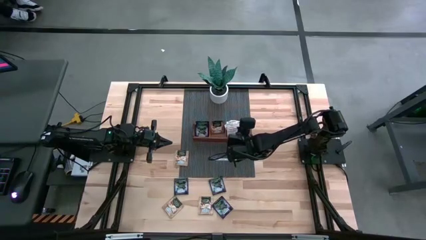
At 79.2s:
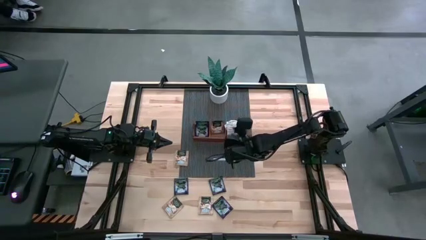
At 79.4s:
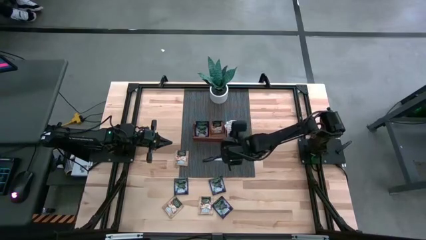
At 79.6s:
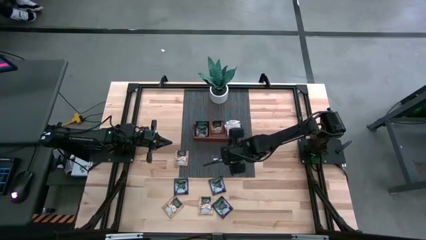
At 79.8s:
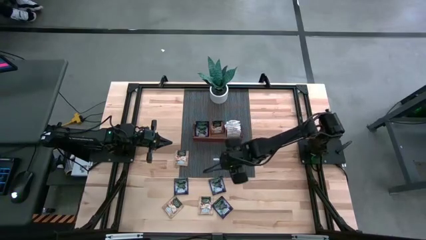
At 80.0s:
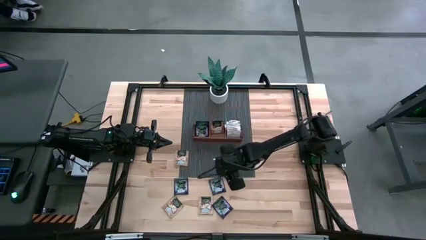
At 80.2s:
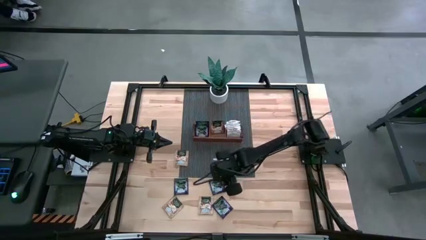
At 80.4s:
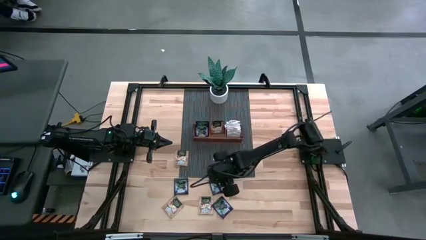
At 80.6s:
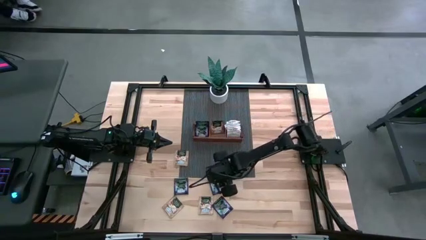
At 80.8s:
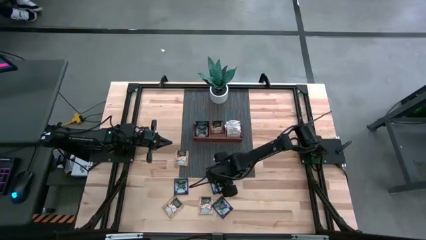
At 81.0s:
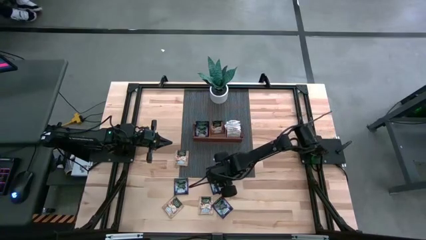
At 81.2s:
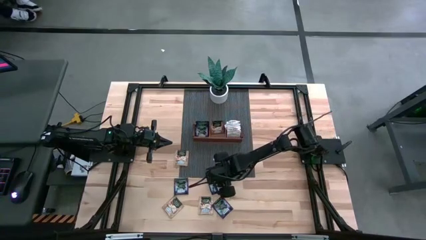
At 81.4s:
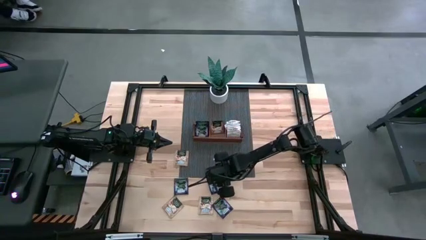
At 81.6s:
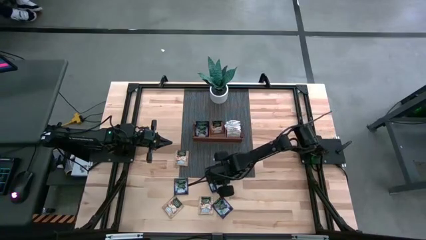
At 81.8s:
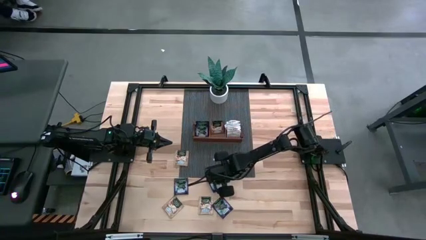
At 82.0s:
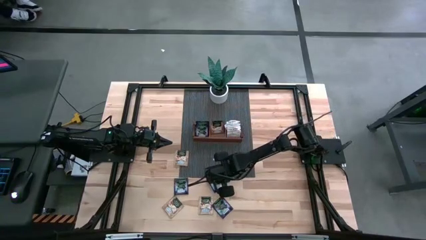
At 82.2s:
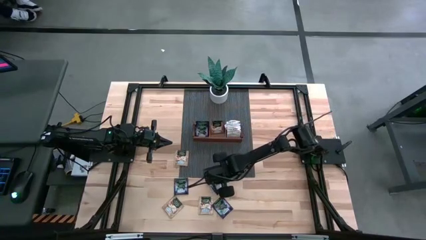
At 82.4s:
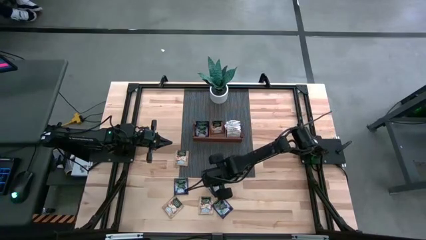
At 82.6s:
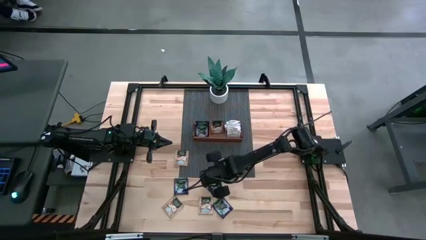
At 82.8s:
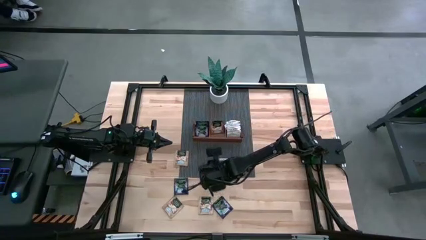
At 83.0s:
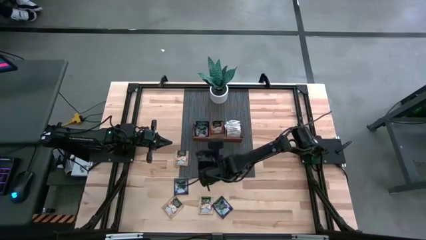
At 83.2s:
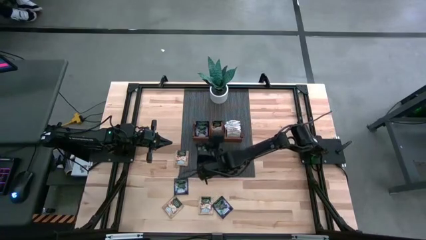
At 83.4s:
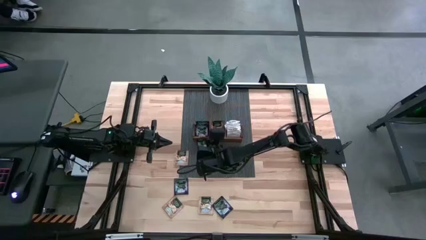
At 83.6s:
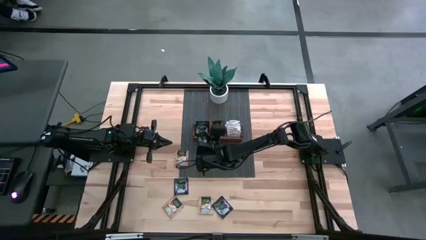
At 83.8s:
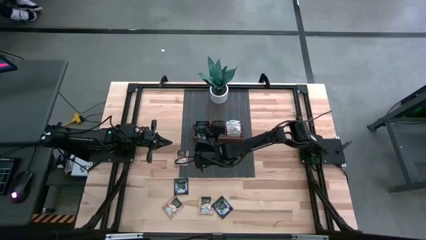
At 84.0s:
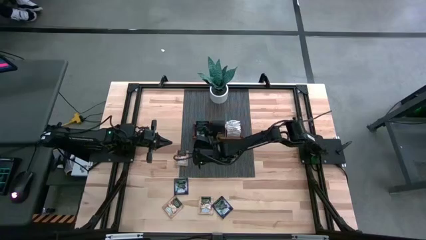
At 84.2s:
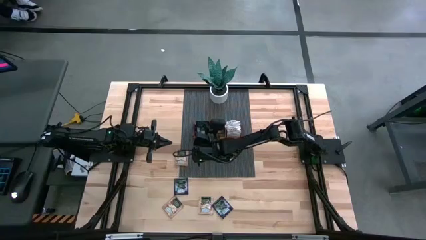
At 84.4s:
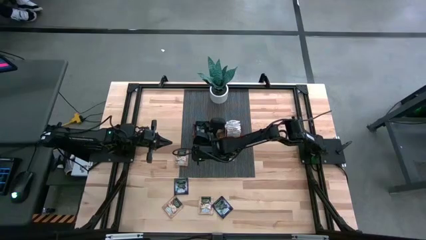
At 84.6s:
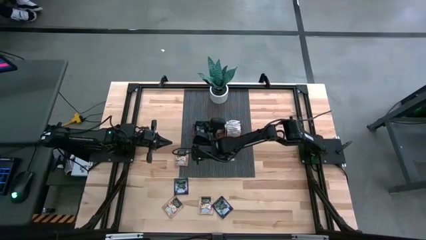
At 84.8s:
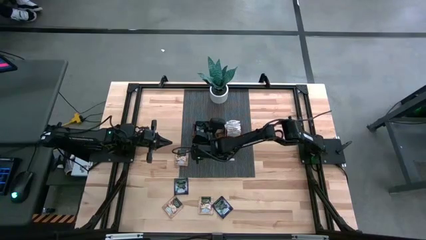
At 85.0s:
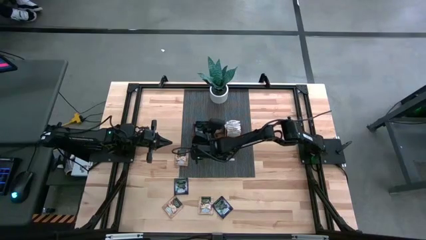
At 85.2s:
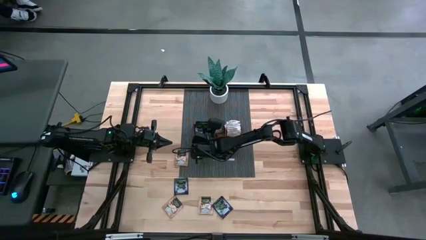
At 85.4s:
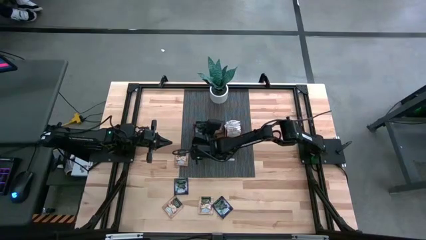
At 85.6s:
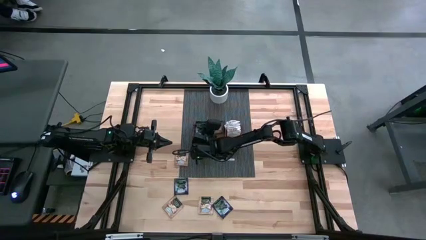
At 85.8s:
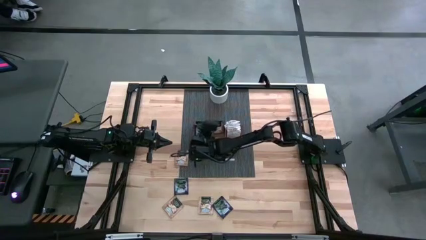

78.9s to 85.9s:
Task: Pick & Place Tea
Put the violet tea bag into the left section of the wooden organizer

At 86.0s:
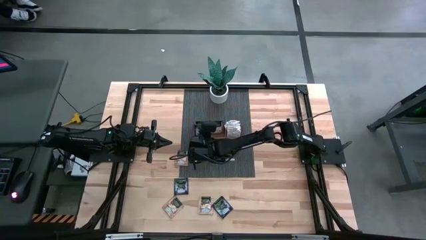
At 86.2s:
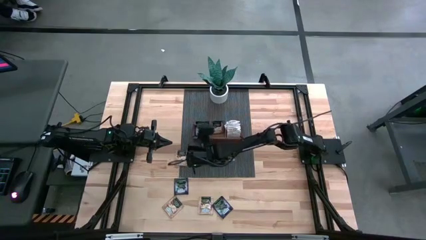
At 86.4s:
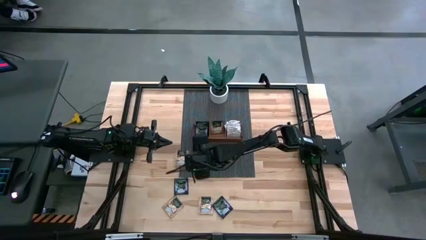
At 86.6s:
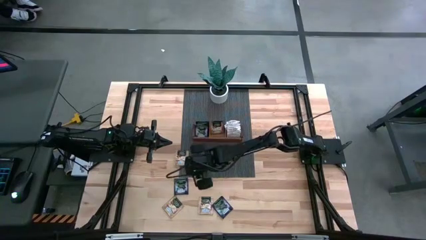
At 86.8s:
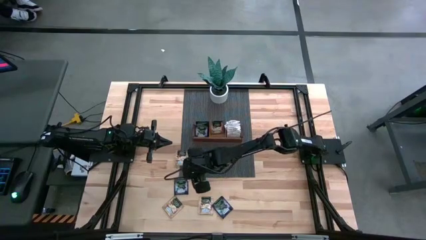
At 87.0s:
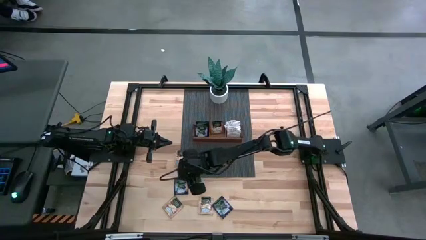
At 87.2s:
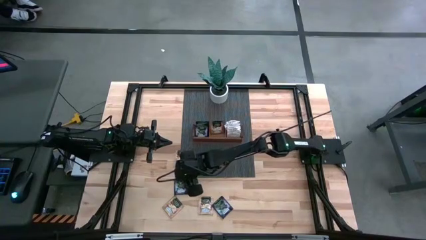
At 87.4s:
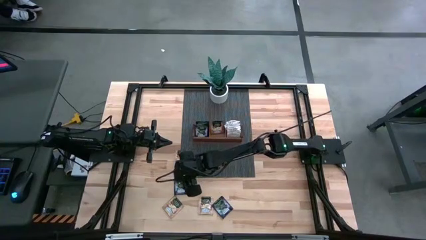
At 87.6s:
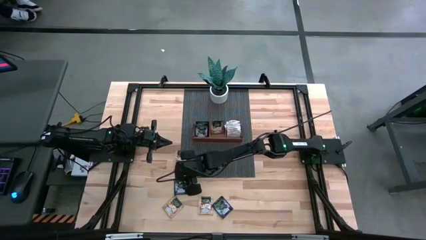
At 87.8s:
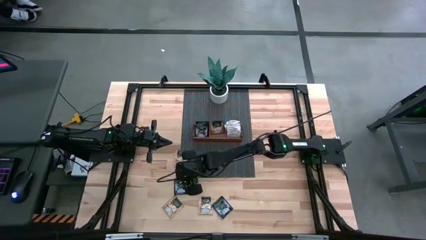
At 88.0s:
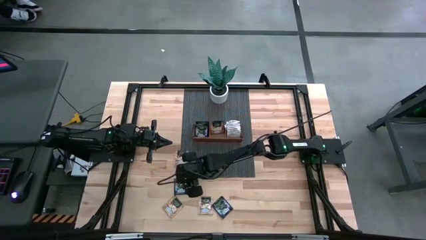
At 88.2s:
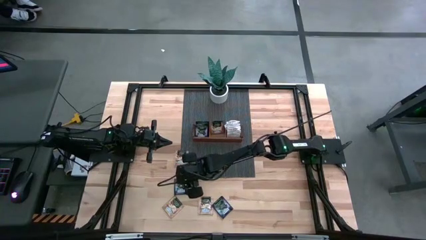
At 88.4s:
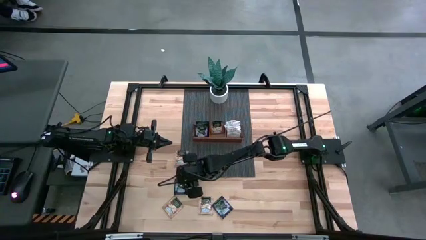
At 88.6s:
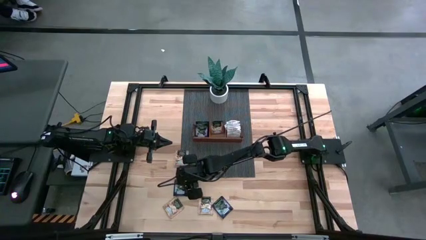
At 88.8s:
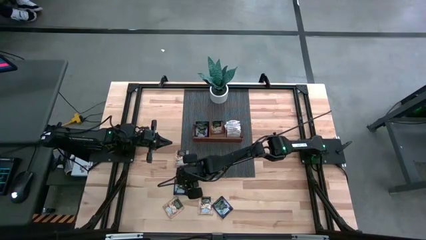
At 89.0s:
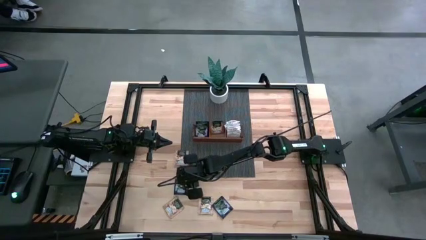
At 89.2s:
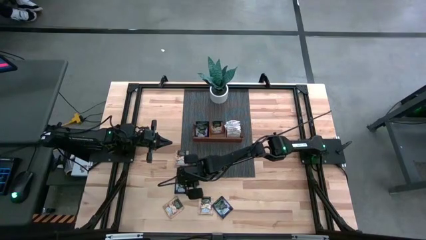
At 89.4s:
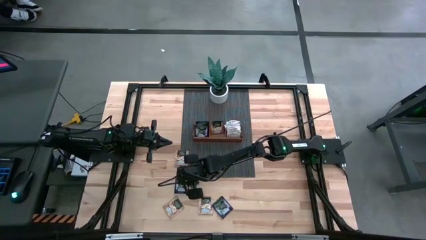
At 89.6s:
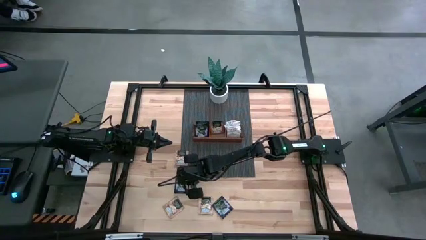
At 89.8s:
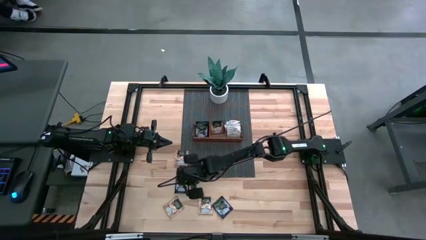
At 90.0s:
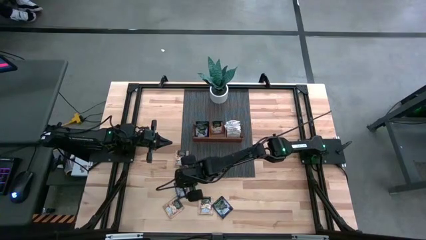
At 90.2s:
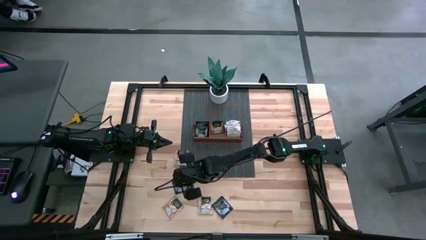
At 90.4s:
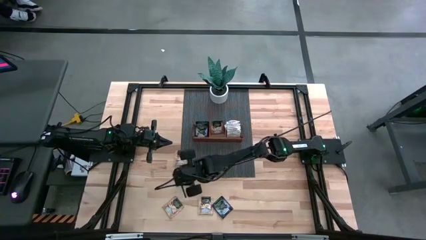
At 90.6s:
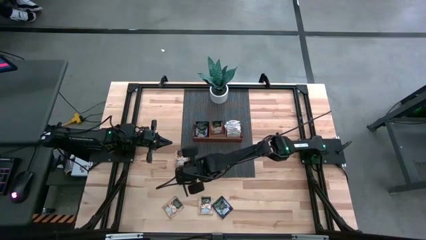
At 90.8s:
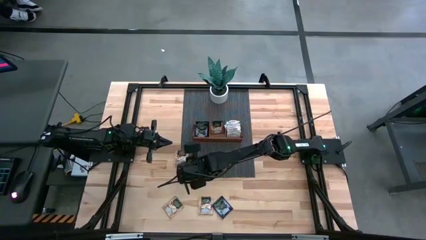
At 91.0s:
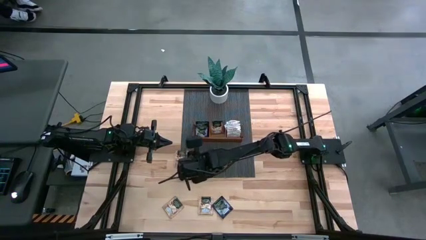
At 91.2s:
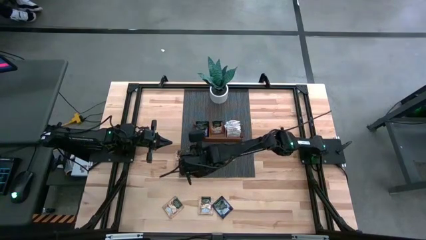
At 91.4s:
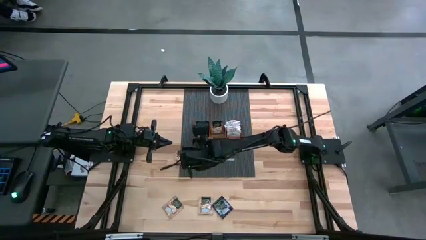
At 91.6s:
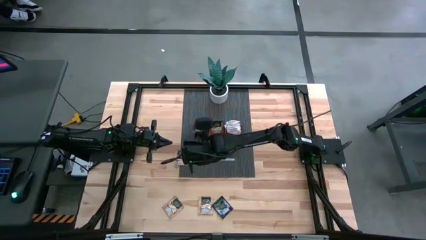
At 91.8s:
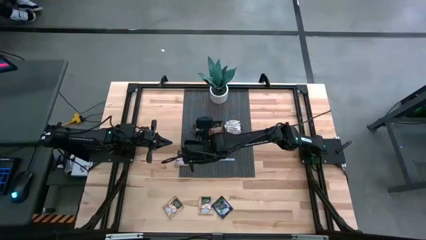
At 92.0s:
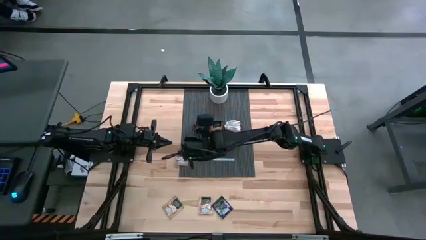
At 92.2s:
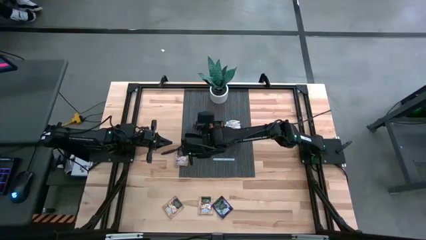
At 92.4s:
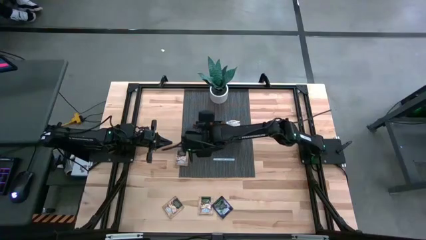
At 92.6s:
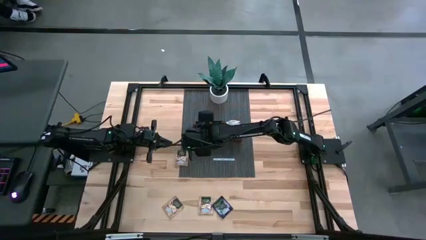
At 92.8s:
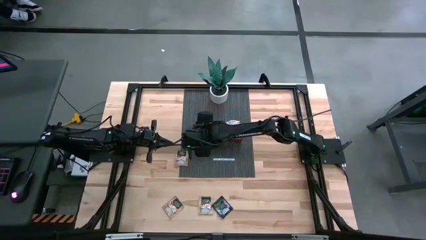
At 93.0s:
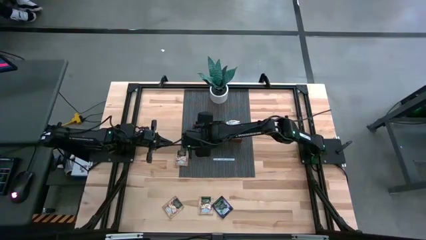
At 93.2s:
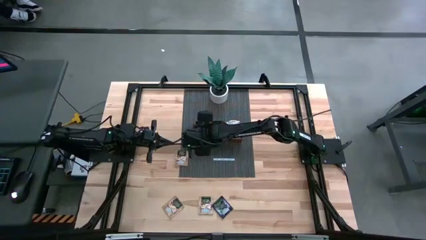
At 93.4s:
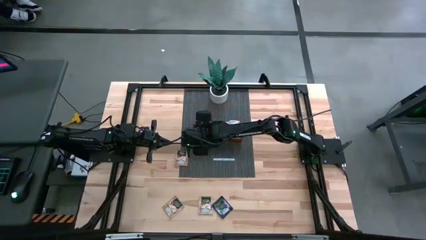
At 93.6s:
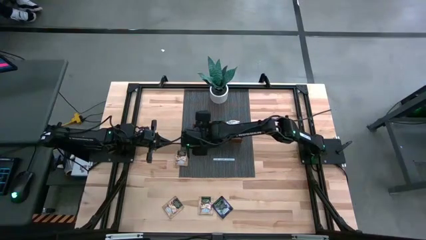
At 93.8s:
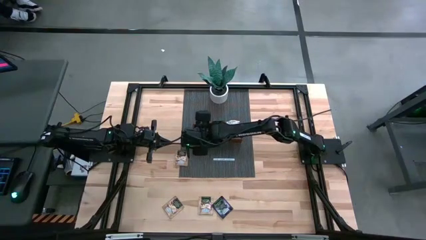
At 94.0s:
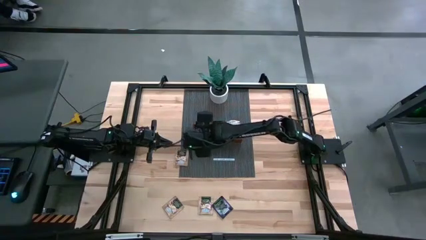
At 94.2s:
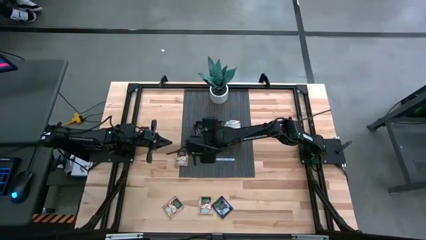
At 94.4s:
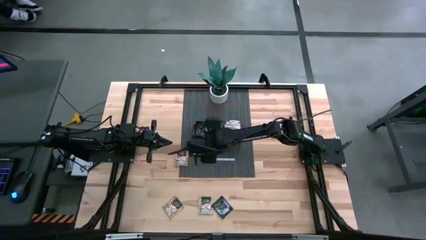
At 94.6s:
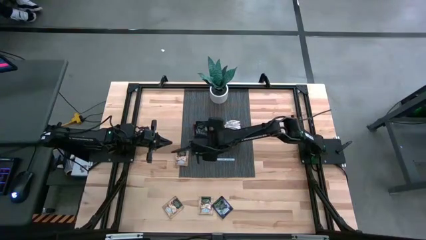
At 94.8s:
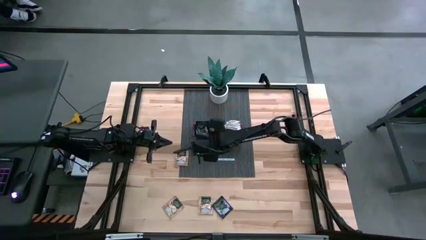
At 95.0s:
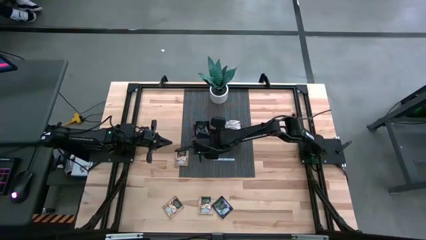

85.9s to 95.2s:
Put the violet tea bag into the left section of the wooden organizer
